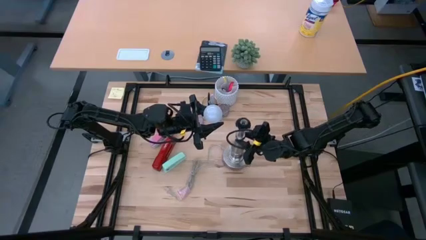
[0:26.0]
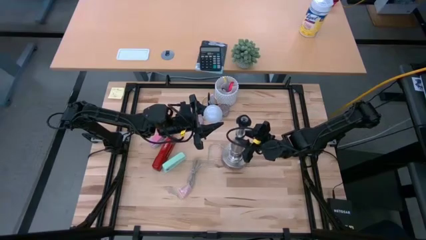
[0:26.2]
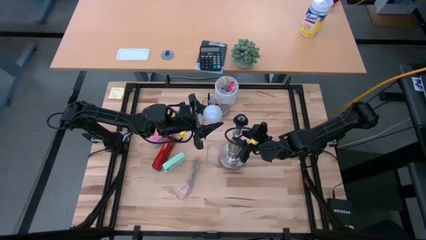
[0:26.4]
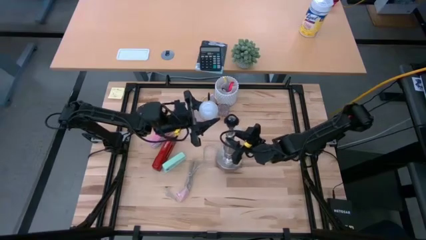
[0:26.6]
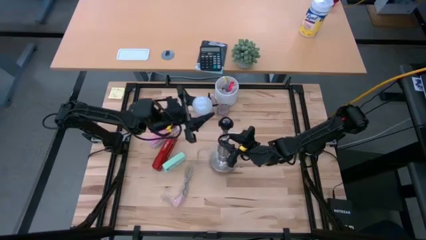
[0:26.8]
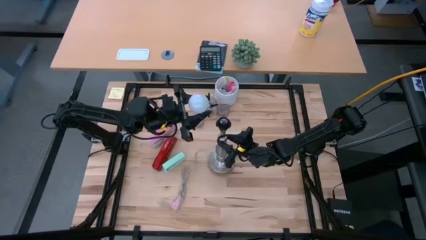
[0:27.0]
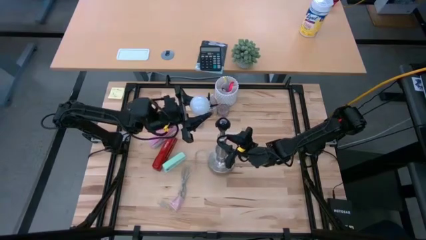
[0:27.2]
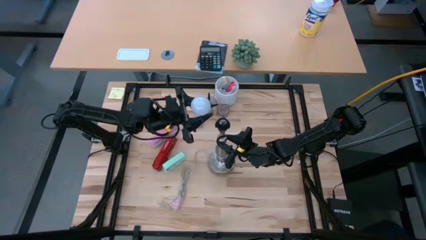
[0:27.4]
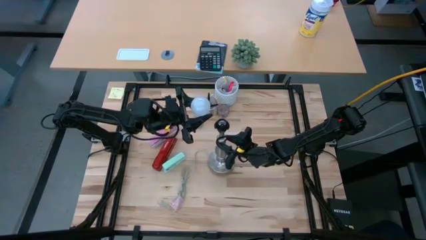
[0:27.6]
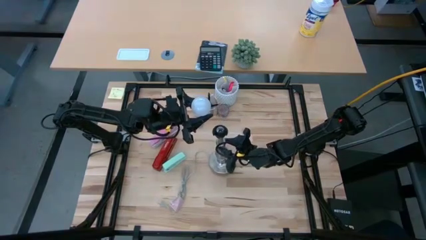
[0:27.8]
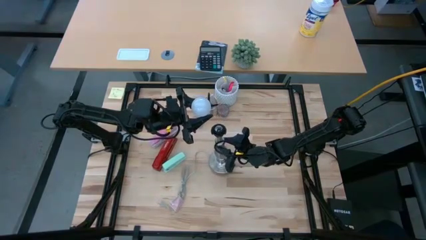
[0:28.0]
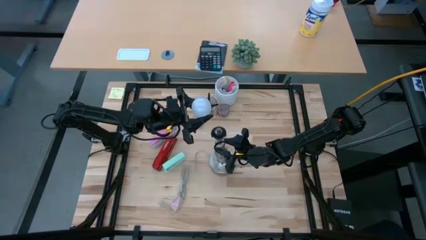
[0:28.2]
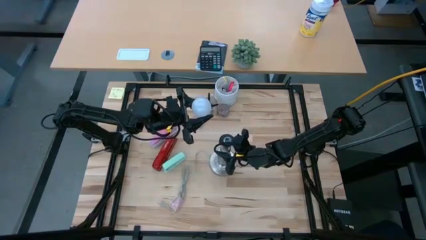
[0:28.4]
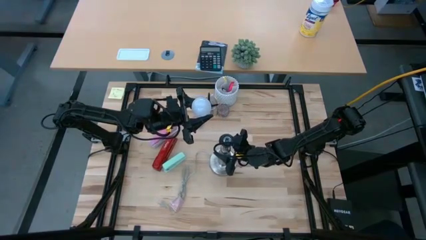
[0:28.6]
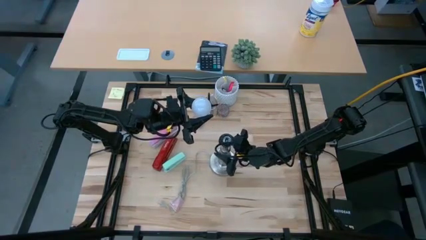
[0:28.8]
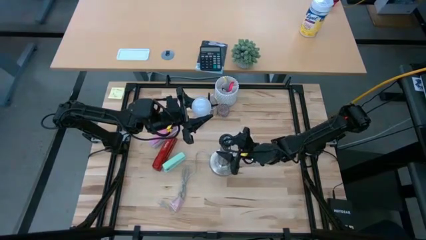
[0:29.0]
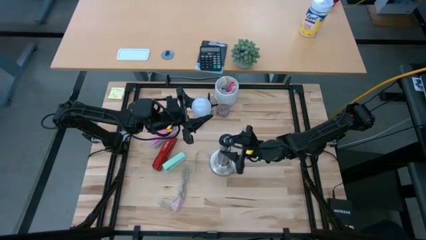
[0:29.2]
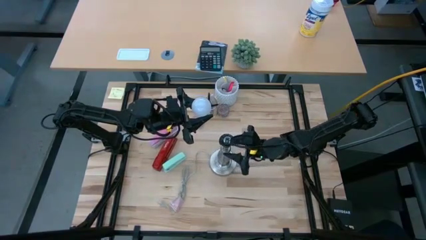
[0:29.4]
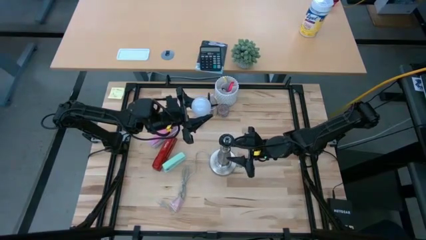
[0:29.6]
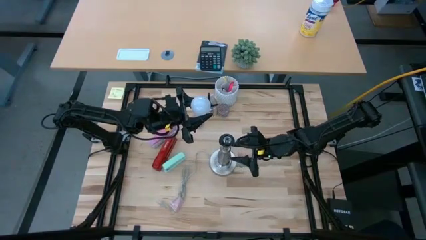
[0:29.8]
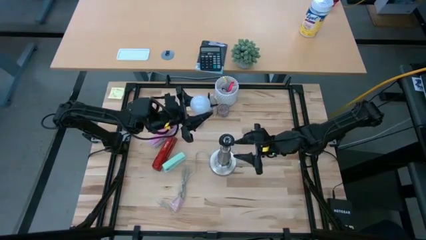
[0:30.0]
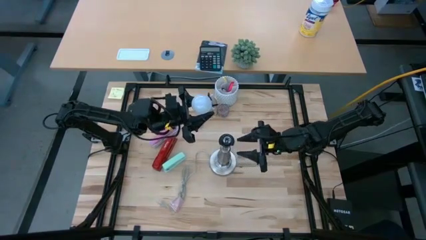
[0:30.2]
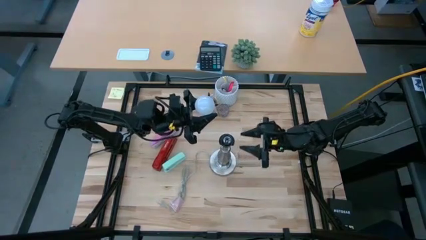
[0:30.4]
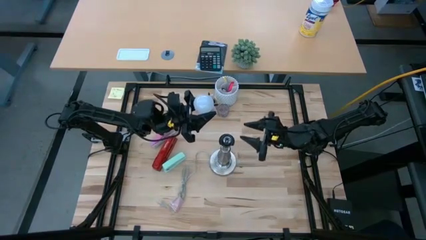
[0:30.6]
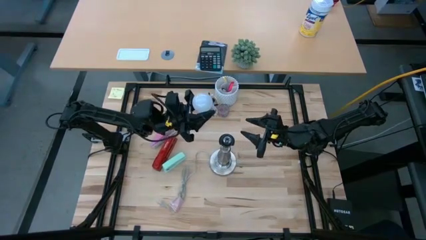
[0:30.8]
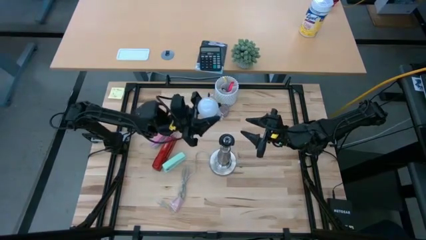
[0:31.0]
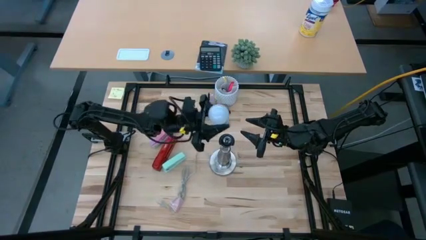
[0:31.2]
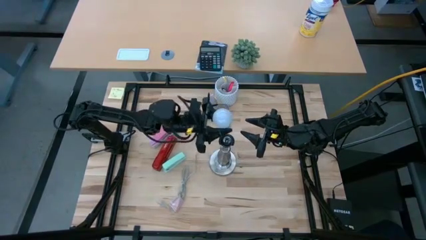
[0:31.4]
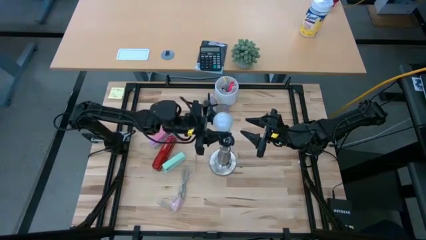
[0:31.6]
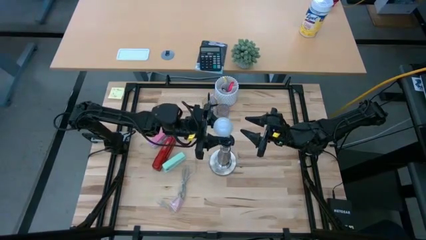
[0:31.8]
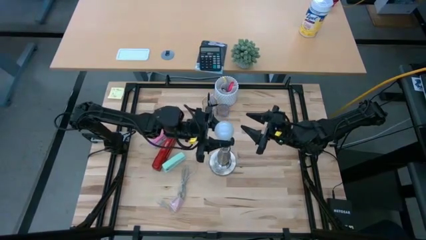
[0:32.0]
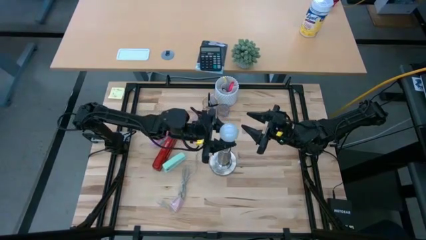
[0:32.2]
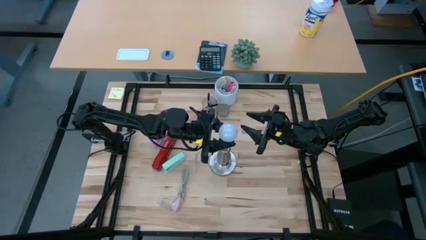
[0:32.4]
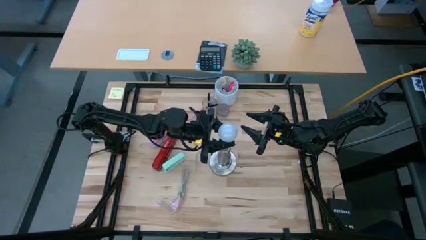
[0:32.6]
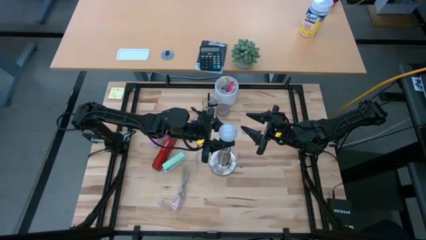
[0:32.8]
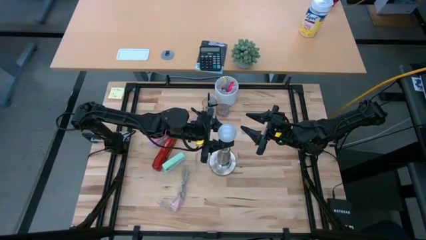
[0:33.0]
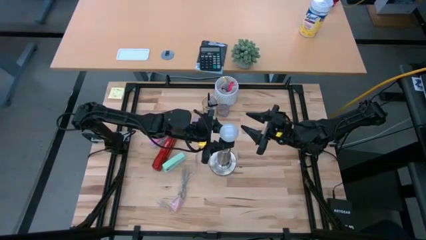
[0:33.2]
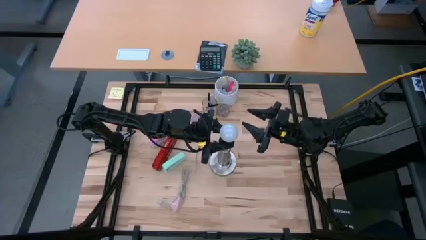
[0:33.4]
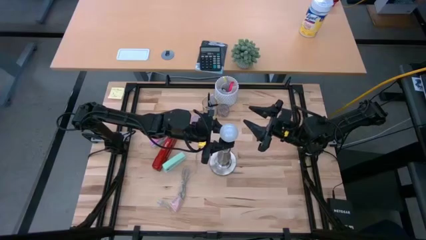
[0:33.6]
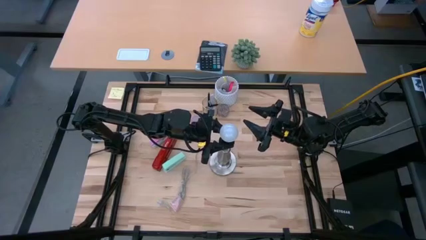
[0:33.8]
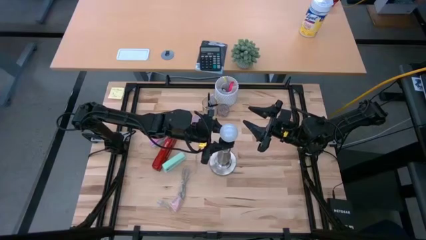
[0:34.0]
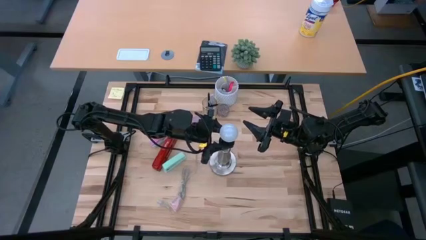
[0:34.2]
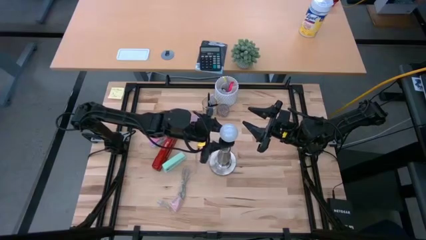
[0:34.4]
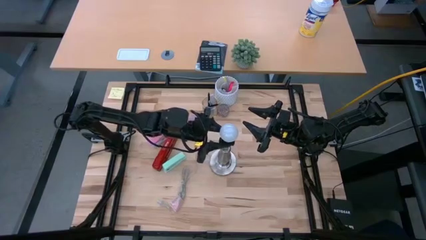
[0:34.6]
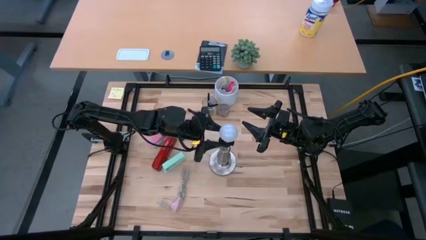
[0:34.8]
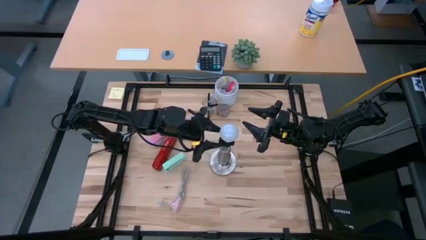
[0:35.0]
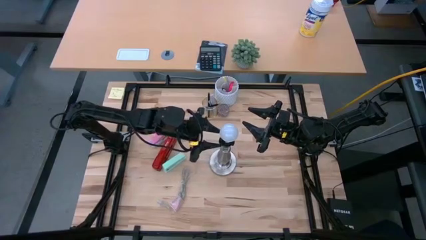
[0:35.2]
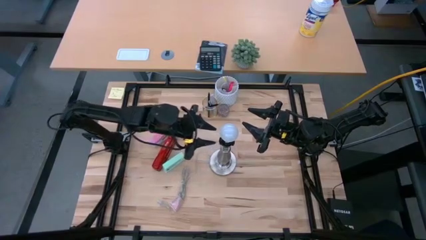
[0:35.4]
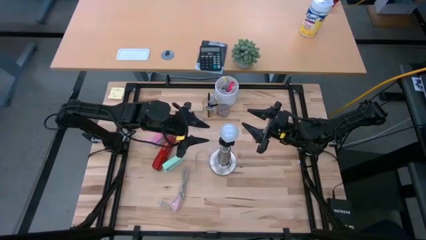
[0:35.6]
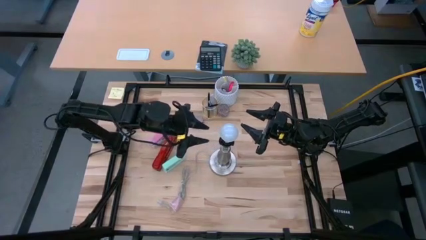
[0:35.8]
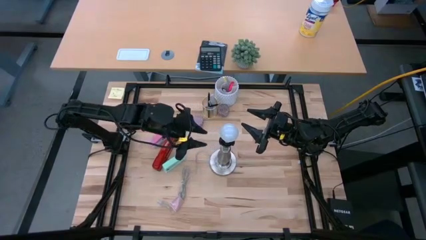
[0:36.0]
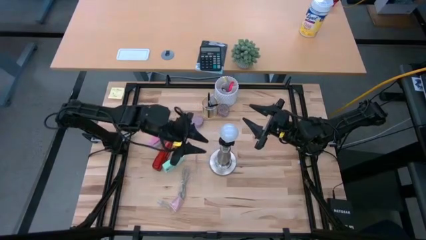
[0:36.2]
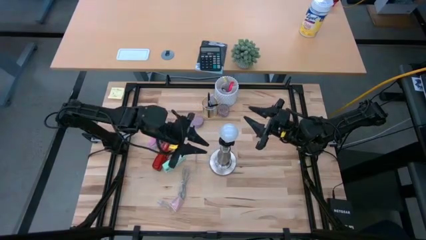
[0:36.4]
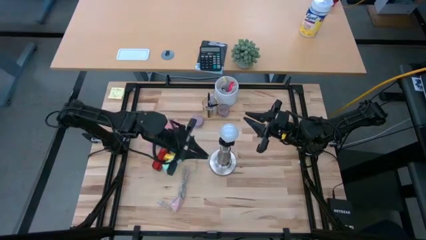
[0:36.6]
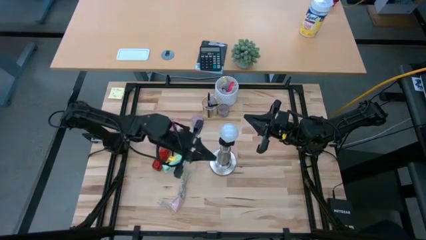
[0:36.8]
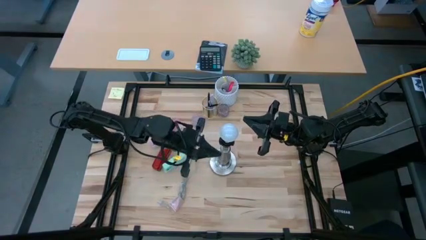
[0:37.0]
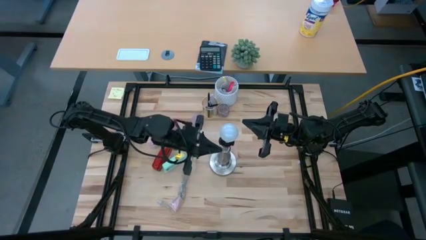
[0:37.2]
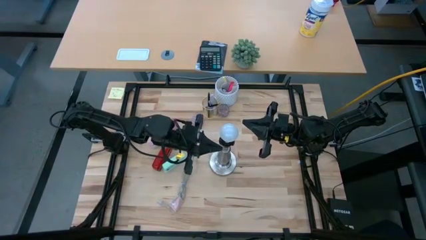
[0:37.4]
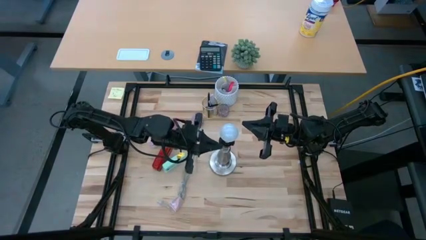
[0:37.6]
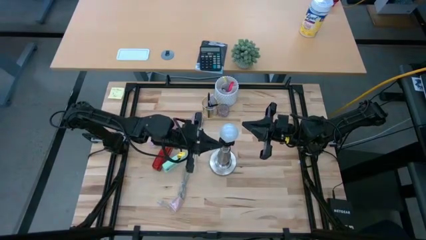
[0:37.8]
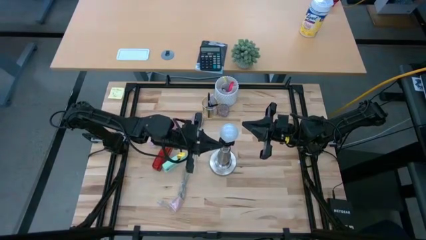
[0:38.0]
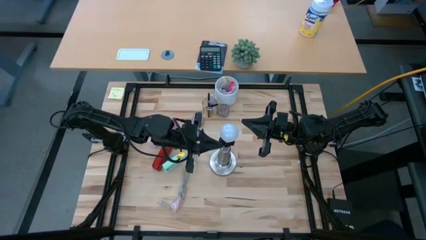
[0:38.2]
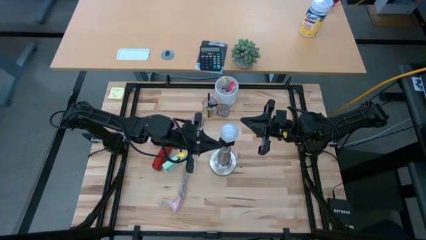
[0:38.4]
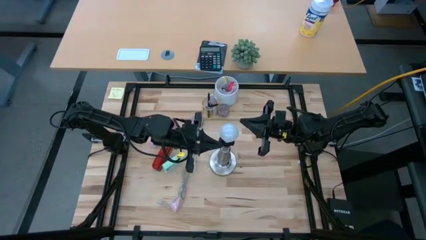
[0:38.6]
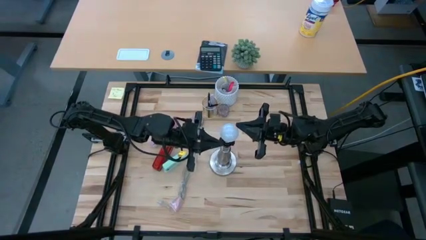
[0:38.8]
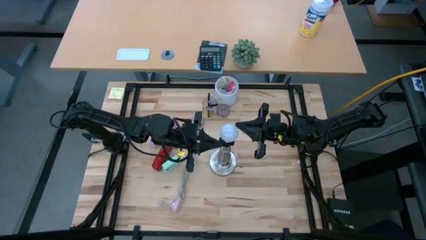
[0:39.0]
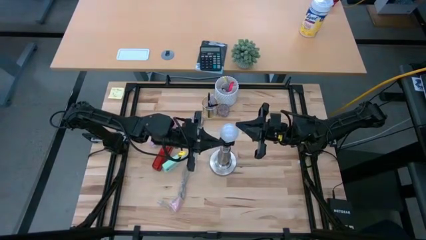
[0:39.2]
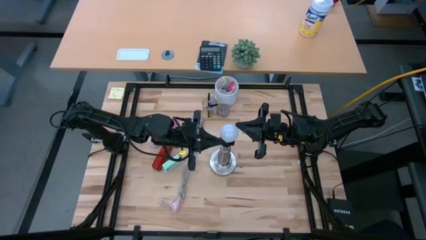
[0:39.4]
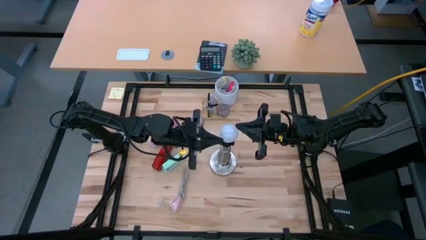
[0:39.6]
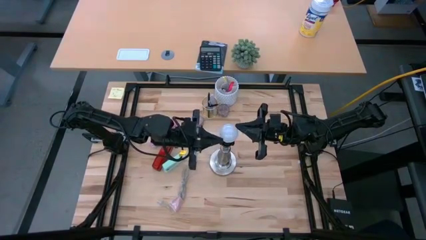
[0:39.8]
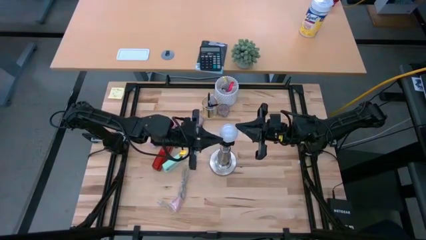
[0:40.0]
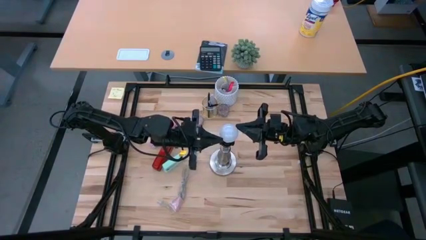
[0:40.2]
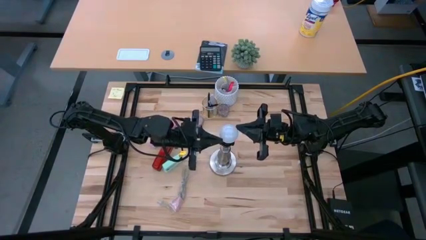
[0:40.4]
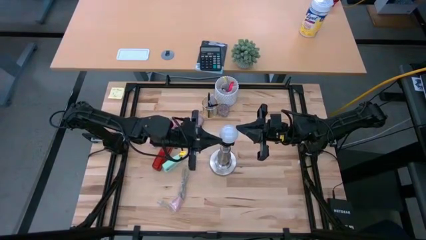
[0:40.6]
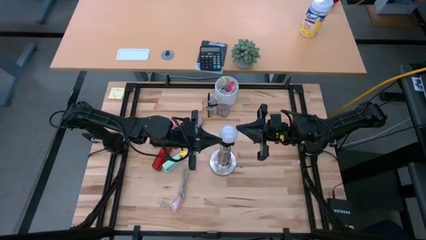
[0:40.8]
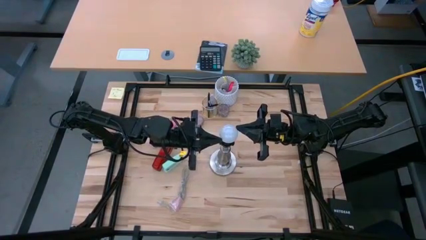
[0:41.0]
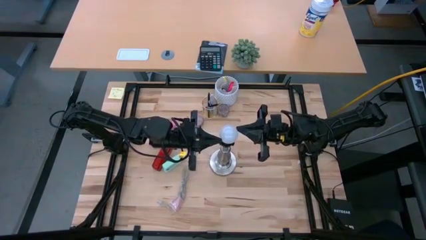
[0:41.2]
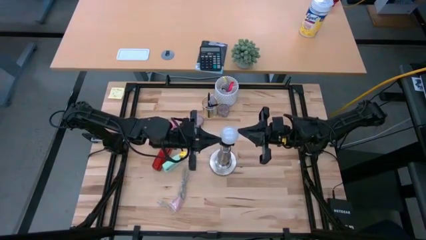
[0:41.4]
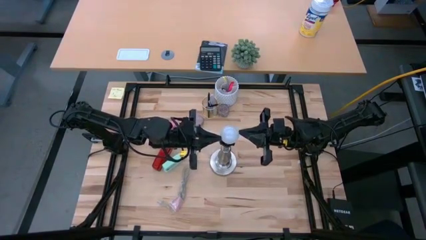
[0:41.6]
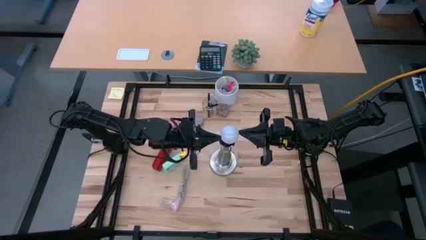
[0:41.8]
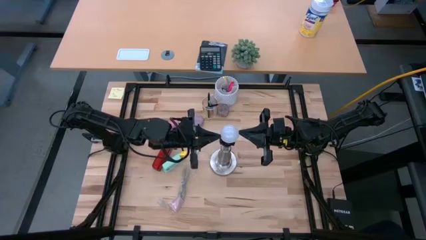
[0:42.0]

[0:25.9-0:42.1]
Task: Screw lightbulb
Insert the lightbulb to the lamp
